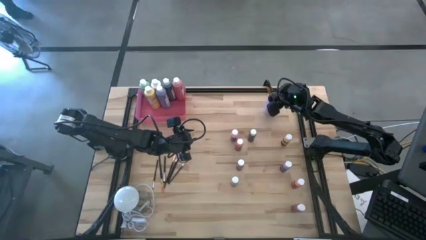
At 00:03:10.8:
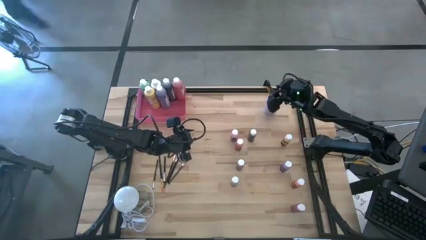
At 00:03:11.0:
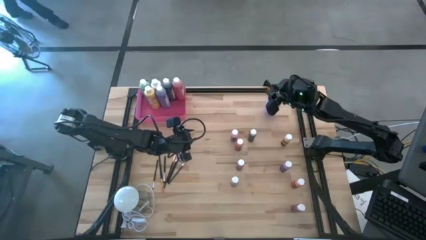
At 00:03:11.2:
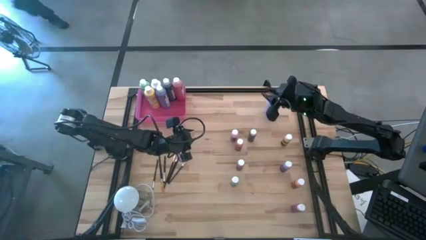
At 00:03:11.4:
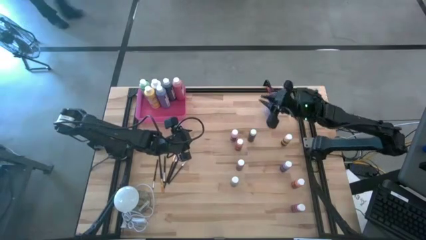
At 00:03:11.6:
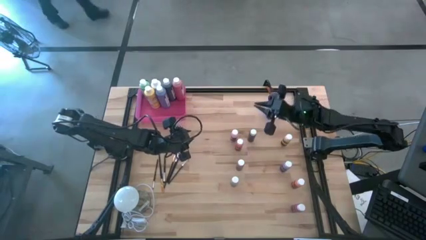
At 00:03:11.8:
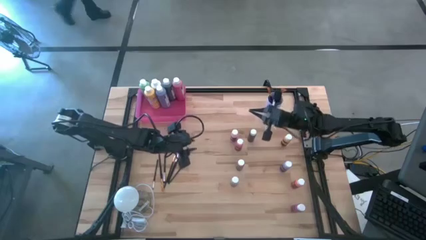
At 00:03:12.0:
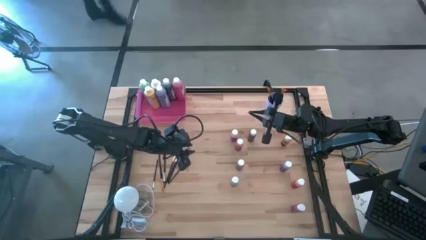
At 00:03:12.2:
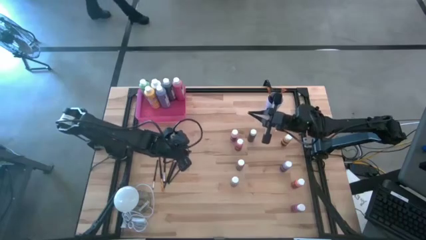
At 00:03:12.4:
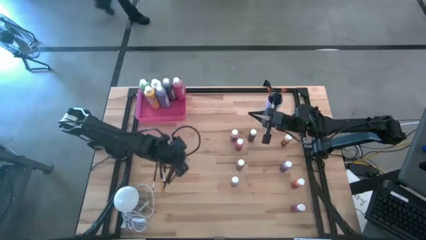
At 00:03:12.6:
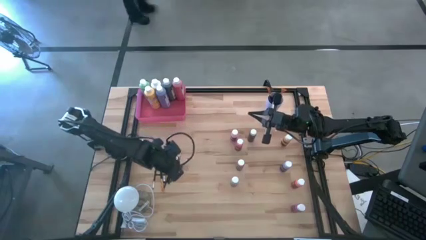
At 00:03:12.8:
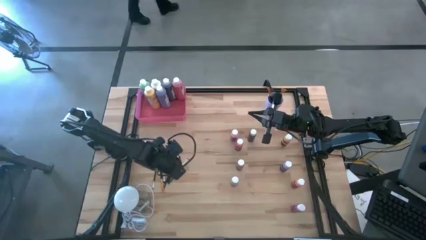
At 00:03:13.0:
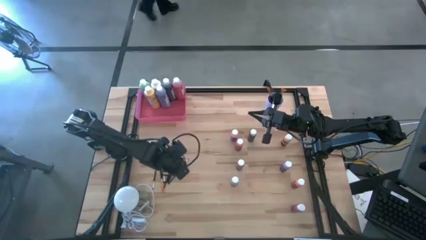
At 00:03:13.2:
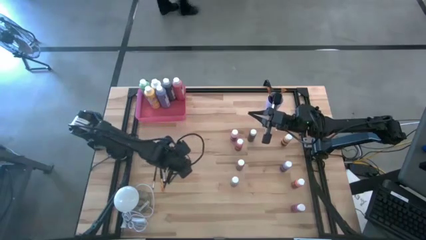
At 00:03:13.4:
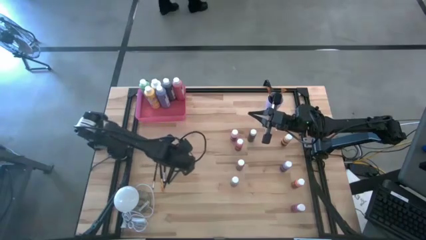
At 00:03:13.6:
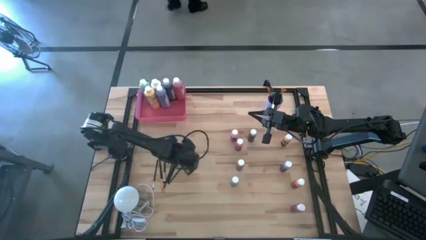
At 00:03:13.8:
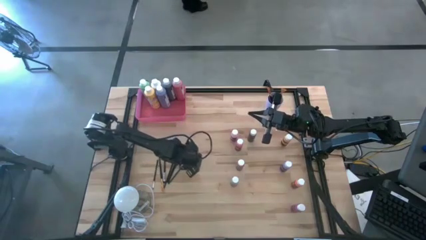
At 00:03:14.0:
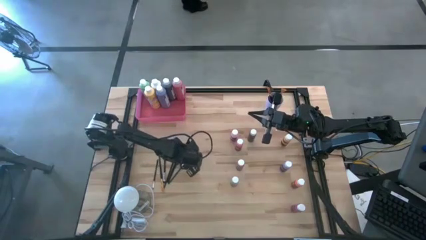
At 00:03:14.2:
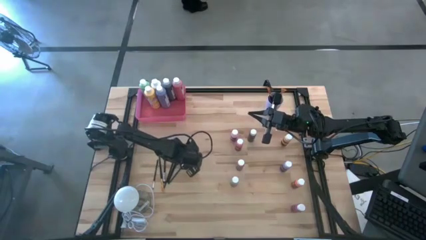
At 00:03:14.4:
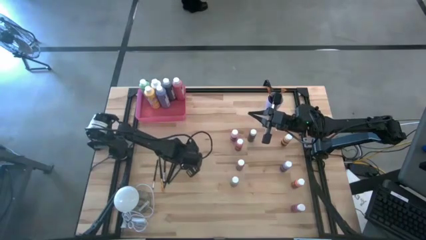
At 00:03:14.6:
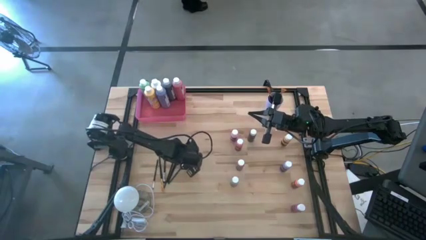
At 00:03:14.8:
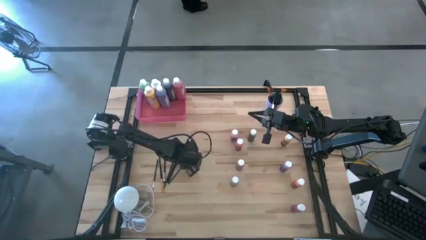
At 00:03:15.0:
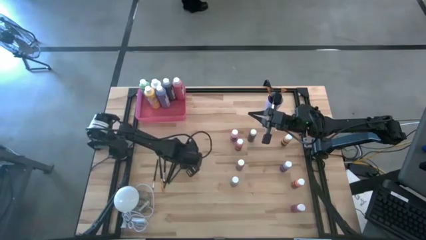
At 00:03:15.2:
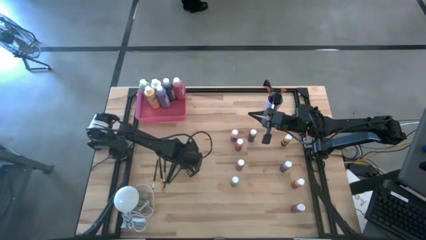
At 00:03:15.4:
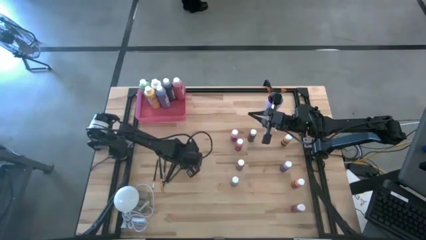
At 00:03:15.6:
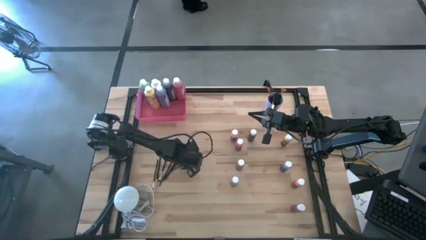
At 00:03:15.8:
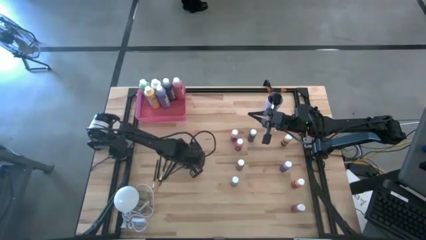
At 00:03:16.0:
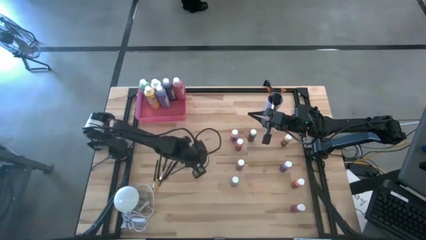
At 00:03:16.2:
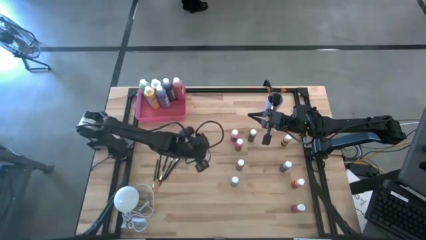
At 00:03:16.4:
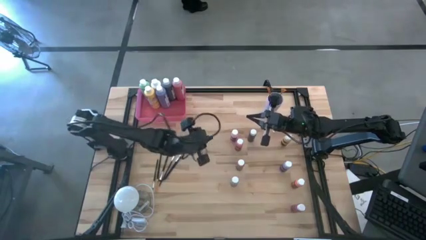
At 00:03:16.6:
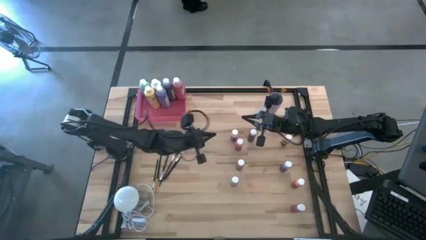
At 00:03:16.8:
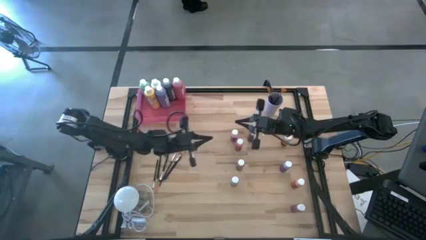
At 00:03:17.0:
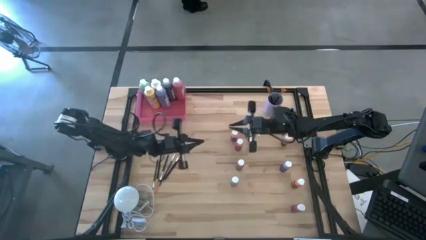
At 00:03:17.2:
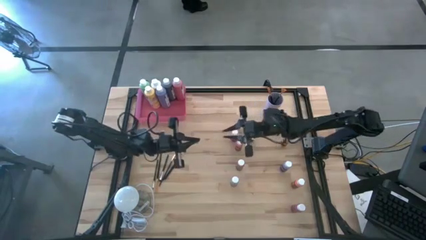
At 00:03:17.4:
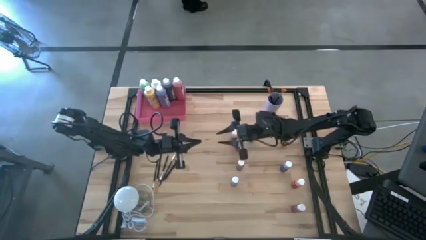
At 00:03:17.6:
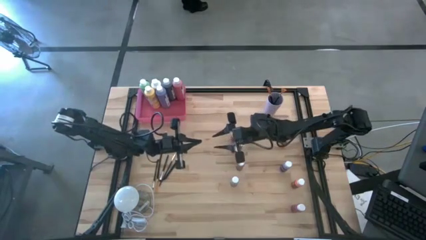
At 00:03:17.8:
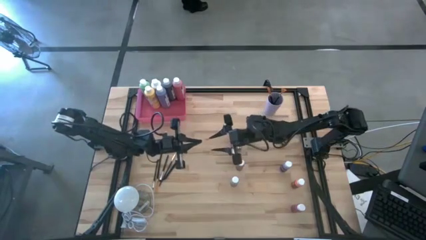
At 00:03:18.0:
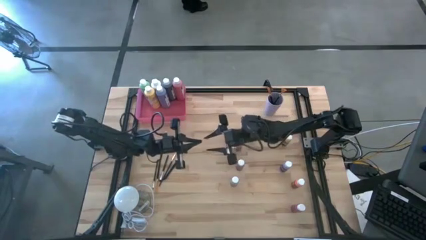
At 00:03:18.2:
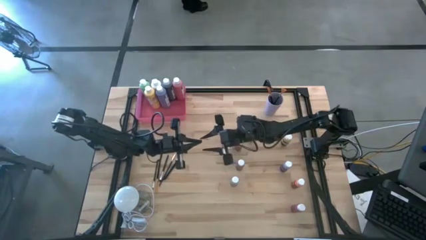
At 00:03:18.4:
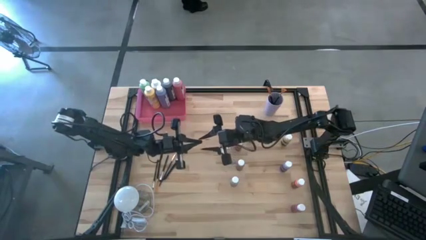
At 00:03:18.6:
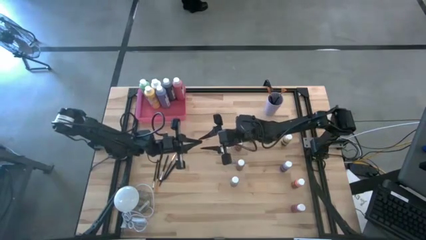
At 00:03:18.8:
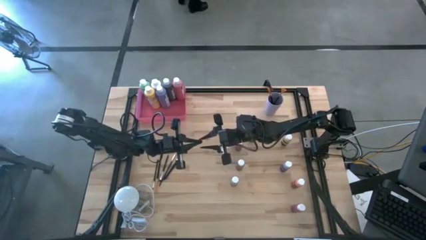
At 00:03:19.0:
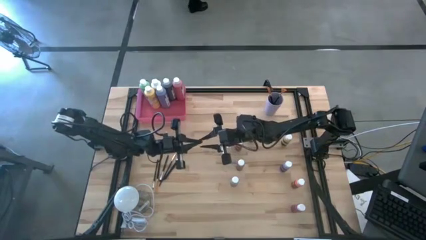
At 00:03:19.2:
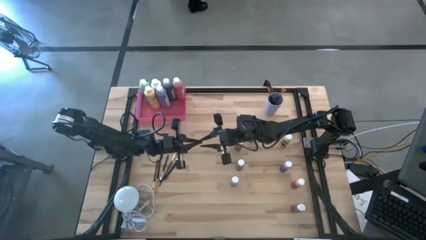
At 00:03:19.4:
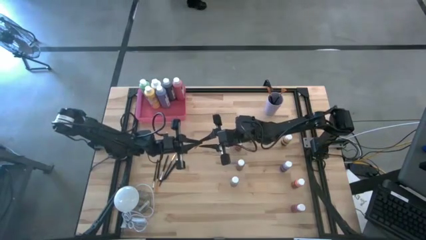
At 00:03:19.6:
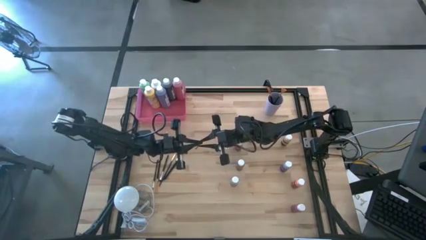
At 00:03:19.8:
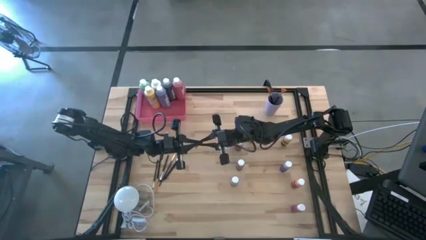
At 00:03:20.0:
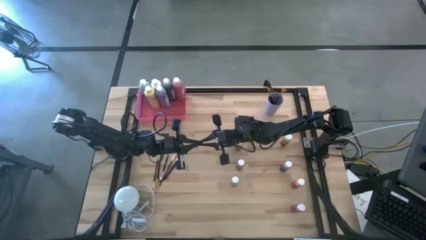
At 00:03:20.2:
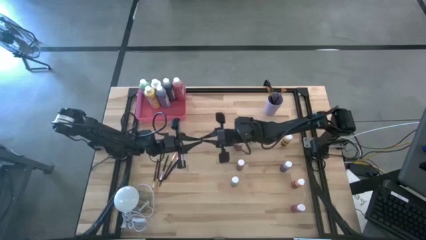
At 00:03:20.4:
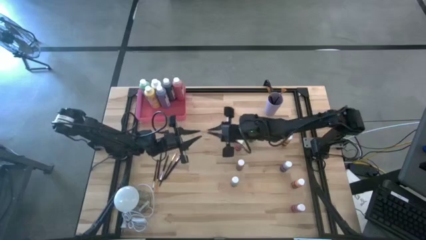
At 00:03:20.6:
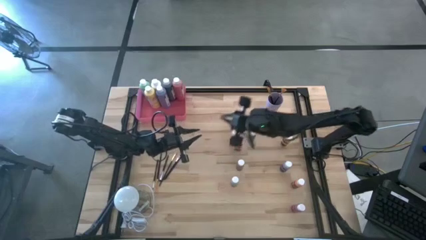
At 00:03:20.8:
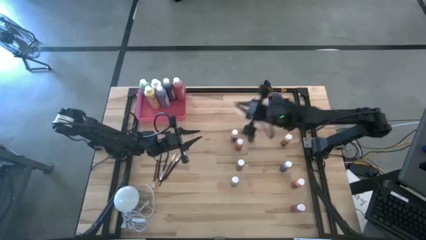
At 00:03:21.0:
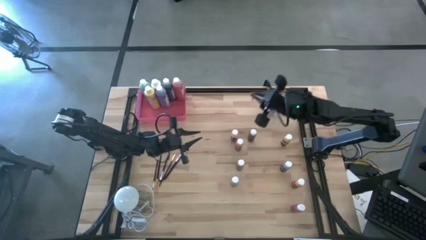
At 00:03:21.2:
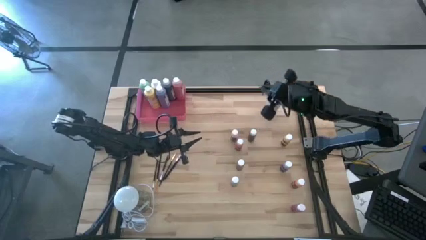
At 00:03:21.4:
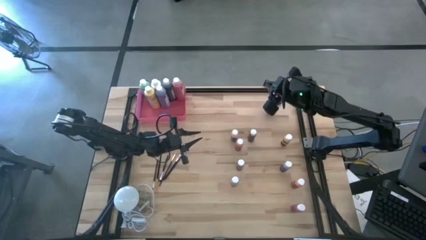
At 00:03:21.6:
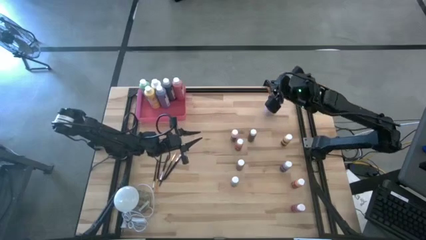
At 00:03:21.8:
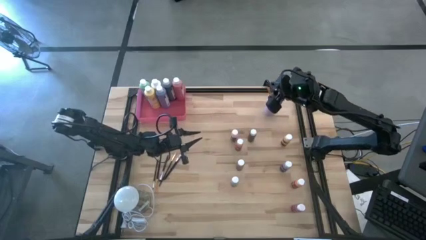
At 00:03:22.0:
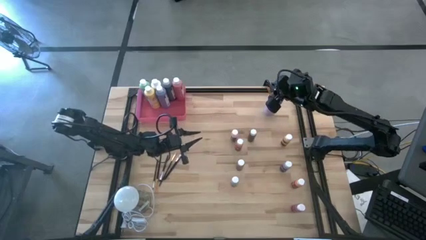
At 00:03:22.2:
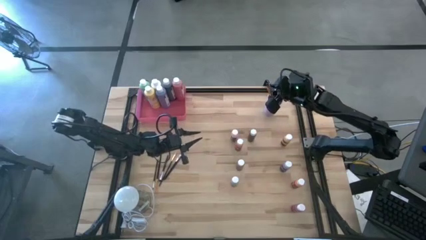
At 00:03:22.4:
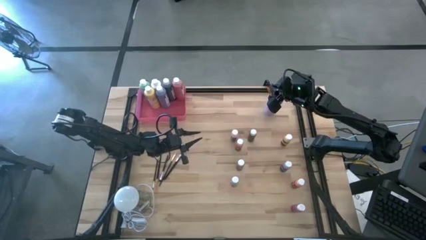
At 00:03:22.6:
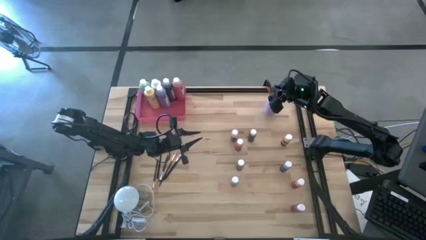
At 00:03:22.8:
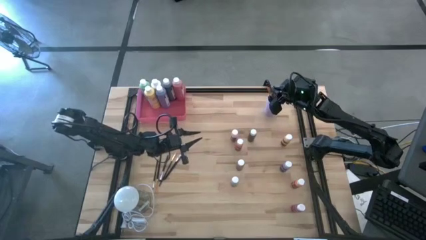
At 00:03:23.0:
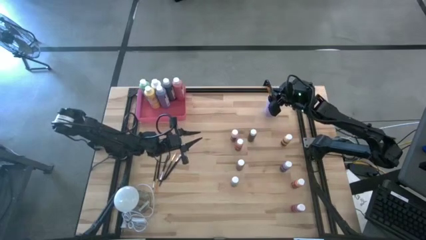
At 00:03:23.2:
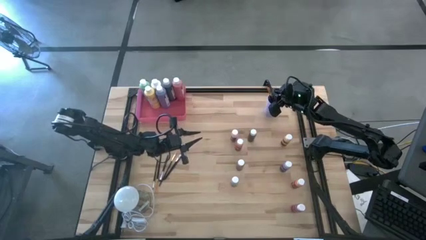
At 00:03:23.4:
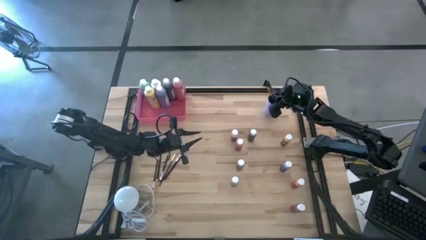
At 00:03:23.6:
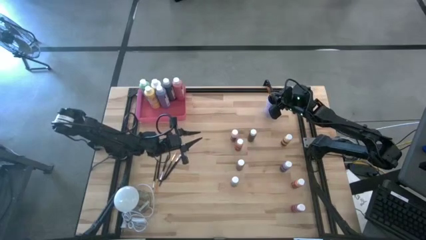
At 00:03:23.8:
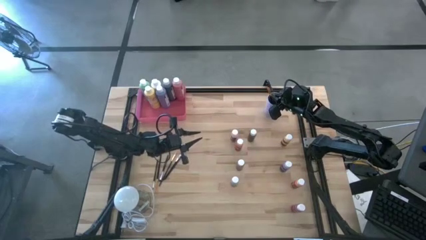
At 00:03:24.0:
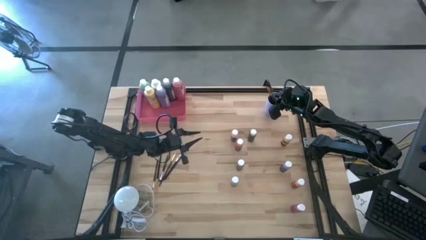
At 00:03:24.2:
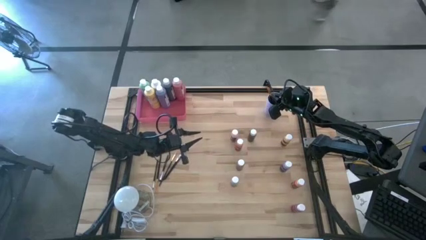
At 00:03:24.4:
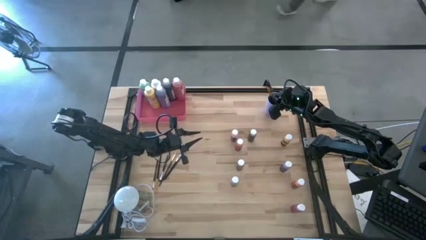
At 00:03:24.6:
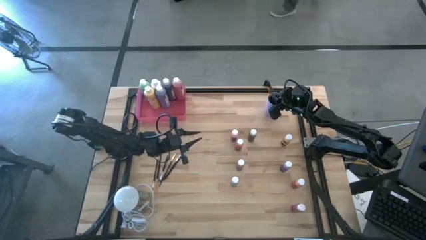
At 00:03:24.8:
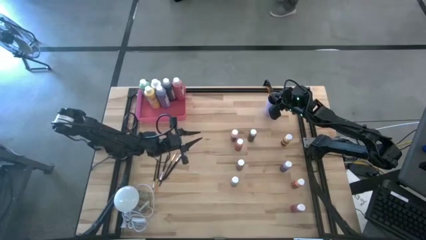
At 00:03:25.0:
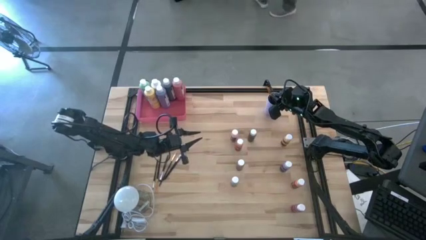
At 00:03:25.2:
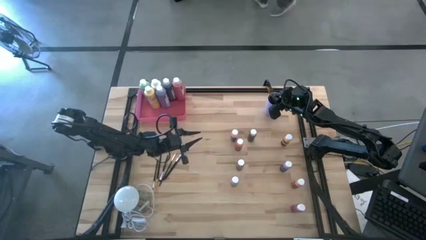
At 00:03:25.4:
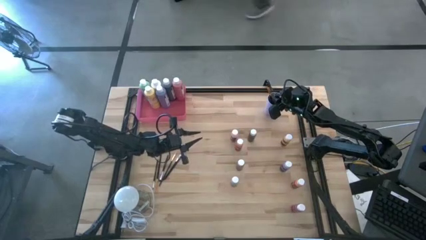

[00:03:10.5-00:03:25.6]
Task: Pick & Place Paint Supplies
Put the silver paint brush into the purple cup
